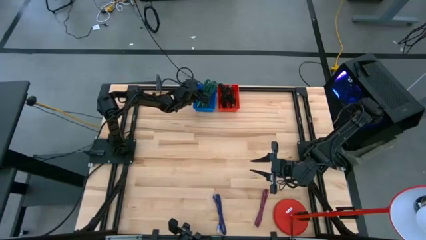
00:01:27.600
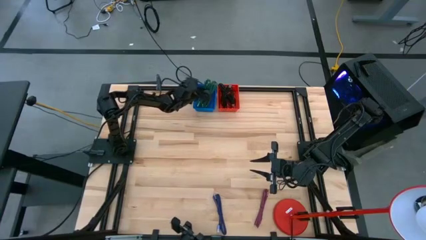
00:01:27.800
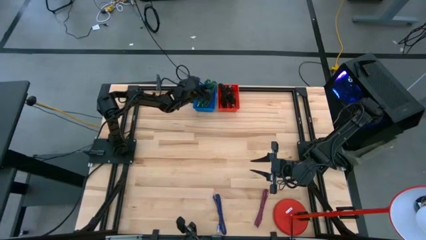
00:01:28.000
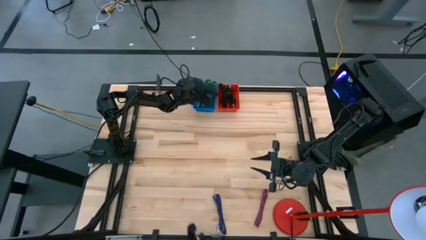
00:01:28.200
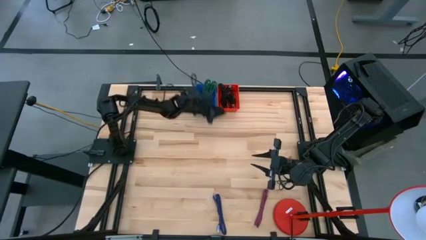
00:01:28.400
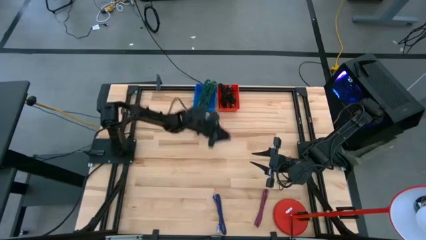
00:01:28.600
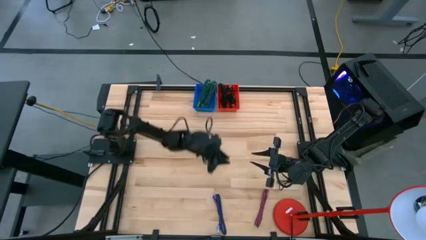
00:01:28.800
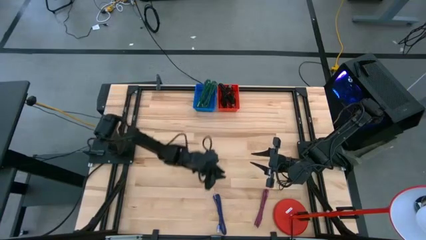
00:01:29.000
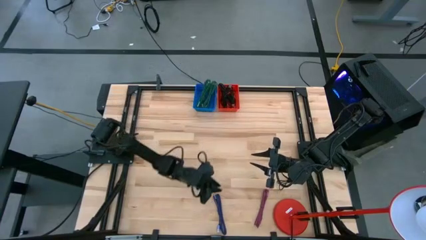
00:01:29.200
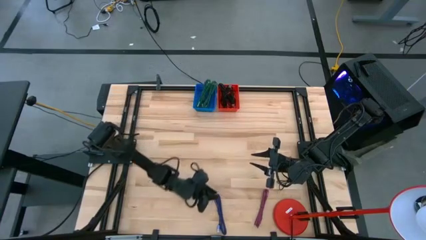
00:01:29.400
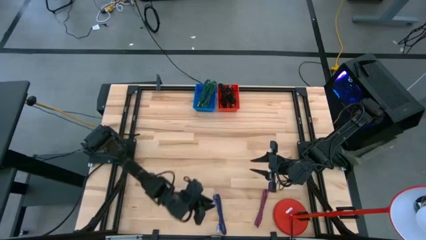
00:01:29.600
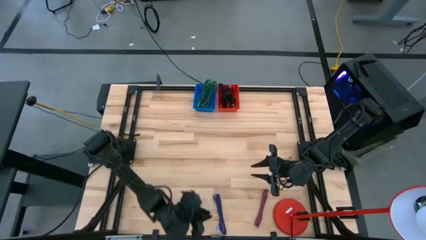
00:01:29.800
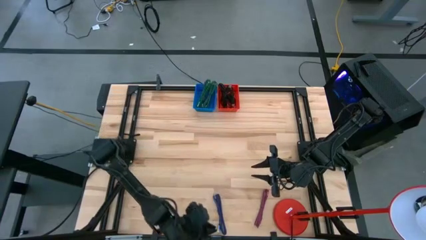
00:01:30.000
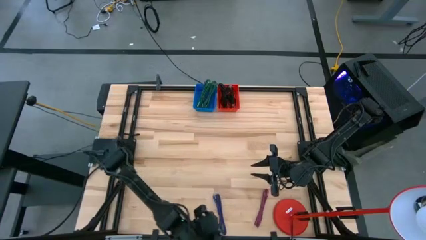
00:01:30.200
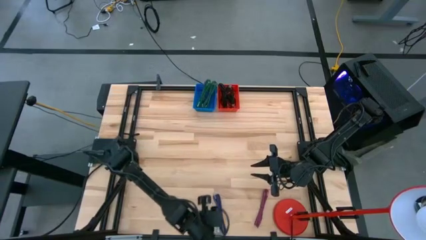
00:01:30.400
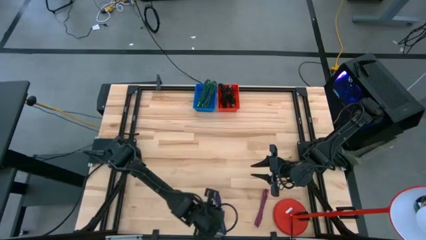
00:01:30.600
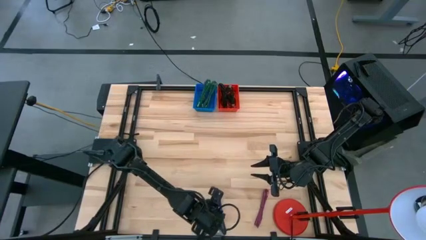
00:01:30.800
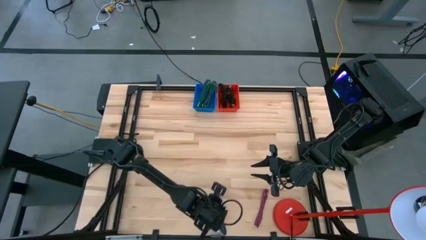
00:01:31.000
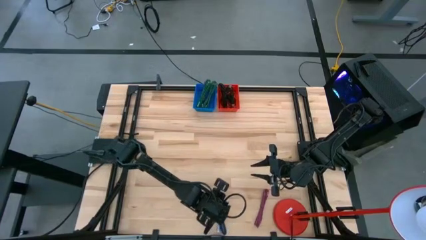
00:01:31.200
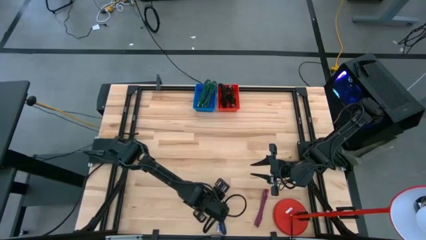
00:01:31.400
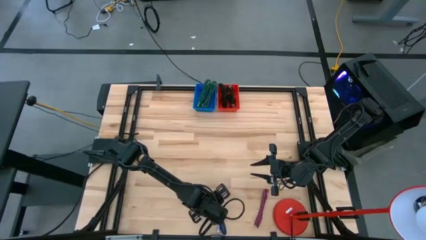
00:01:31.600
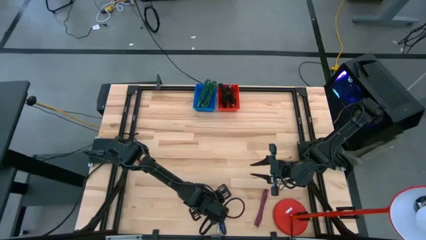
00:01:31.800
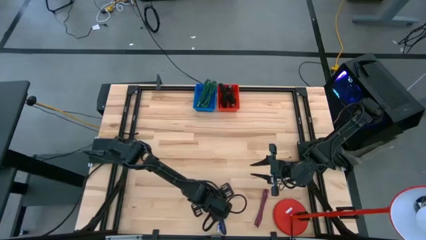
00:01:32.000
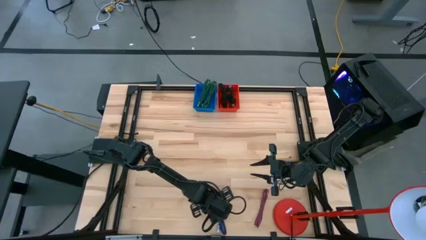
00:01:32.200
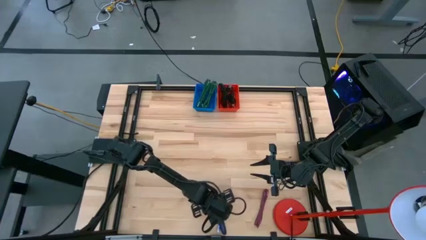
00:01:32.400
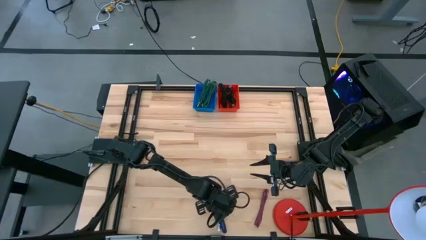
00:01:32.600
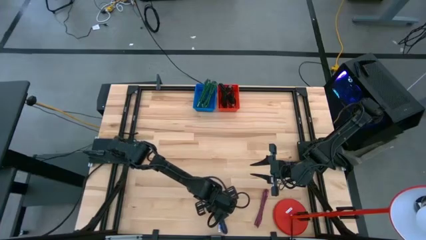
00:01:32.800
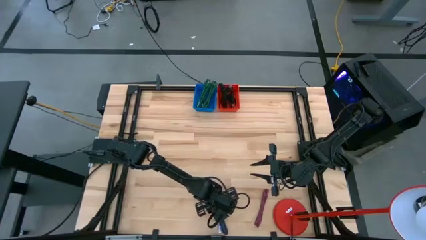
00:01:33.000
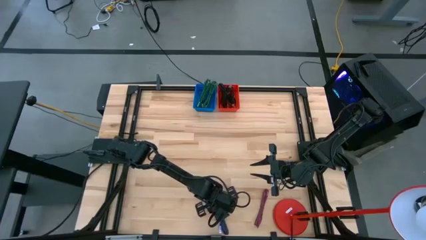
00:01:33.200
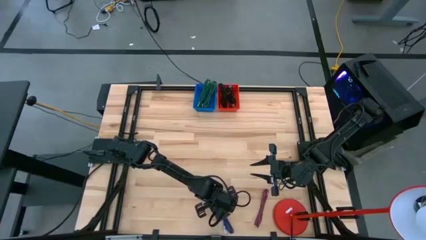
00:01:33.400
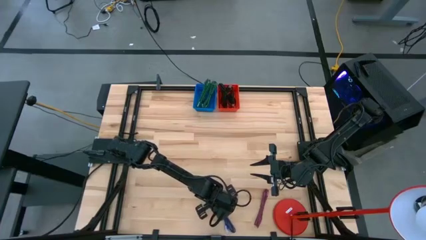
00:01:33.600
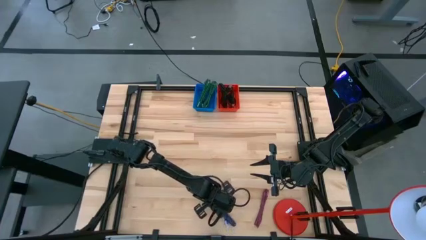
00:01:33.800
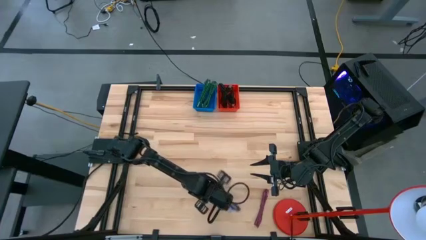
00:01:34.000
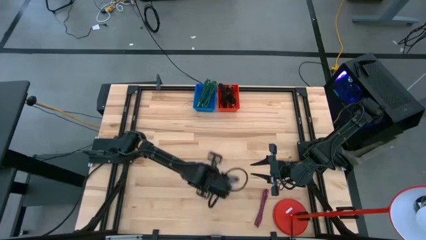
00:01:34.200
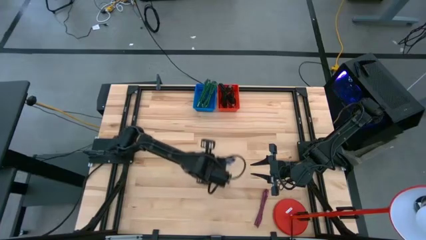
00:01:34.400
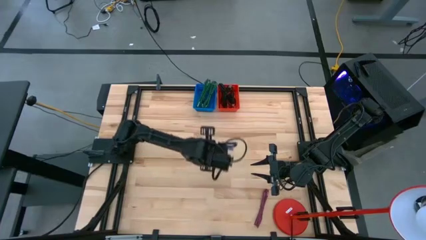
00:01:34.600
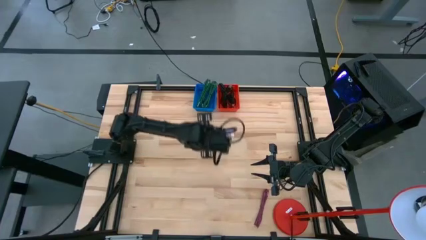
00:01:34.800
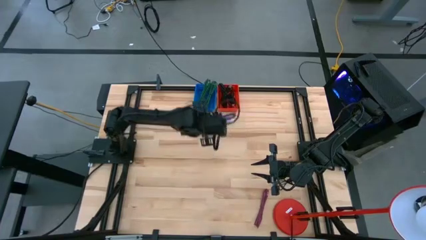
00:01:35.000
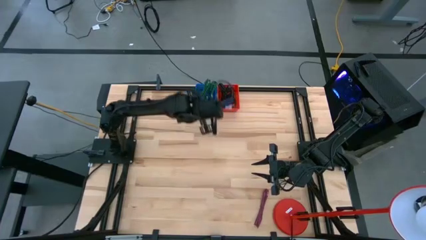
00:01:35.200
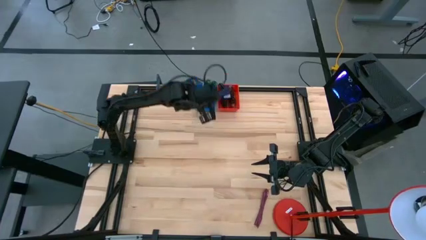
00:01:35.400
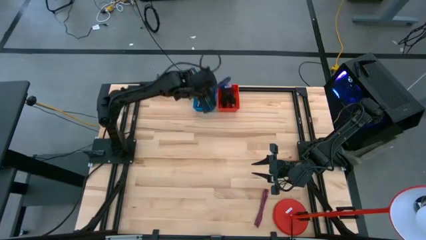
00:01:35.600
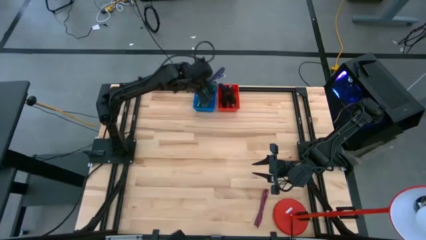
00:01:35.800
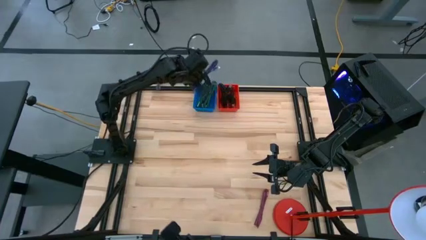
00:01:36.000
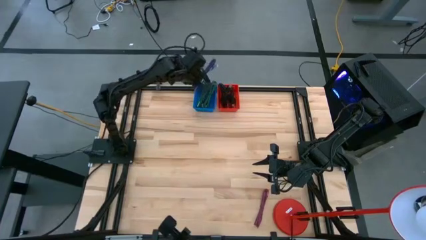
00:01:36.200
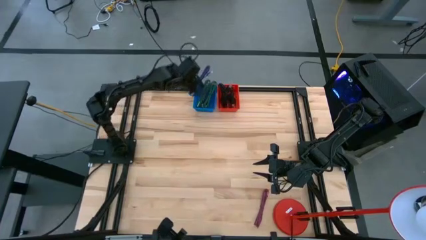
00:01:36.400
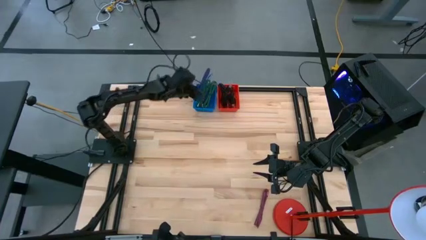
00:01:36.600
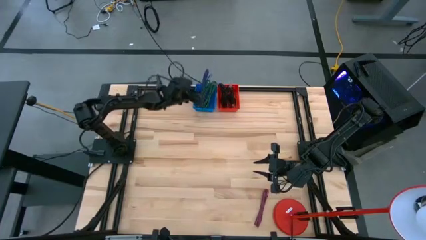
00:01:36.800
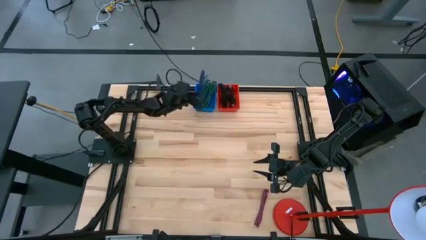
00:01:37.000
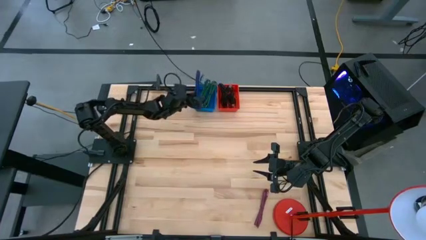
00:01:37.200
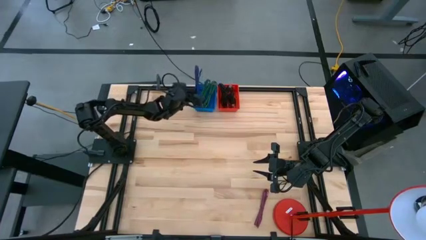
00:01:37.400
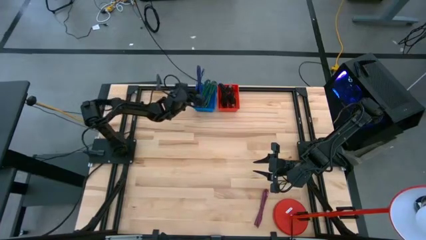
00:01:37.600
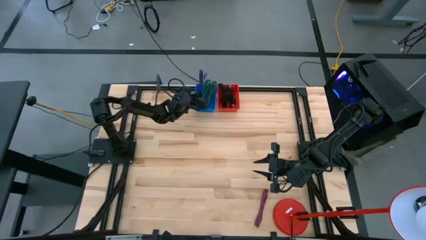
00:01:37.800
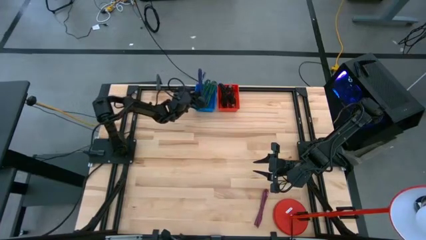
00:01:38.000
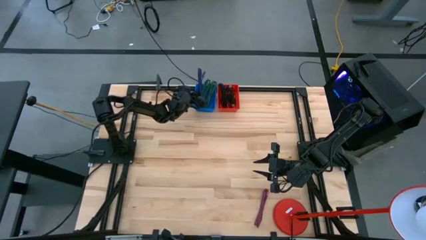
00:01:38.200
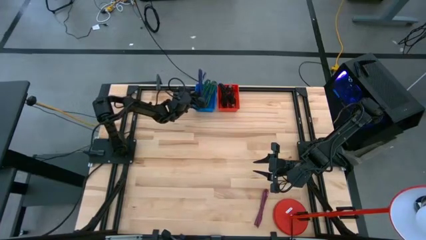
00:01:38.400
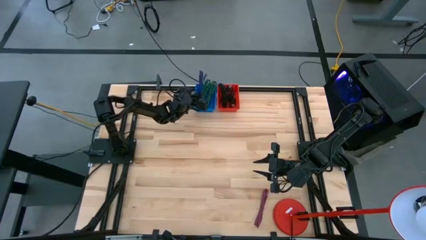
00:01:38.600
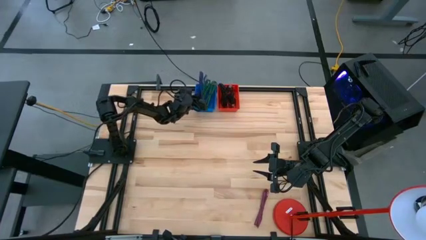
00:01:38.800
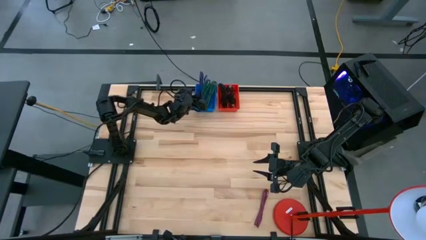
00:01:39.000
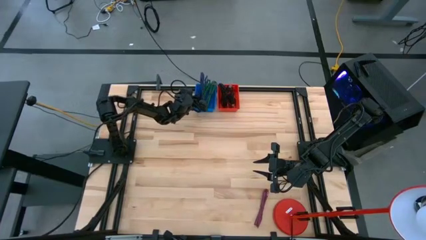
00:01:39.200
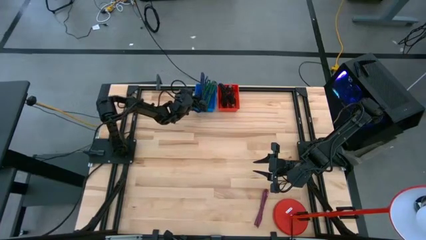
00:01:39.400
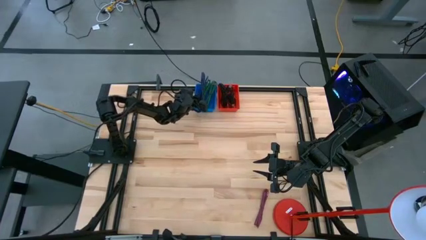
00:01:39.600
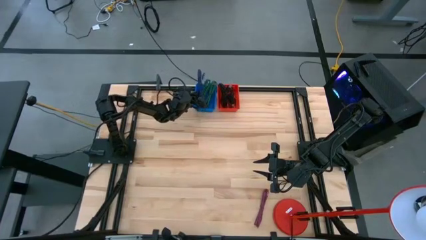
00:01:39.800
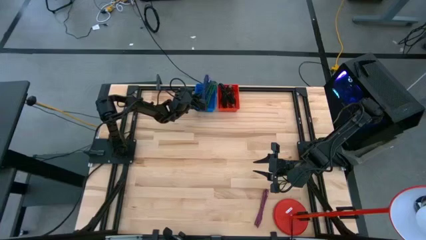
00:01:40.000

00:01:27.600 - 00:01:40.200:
Task: Pick & Place USB Port
Put the purple charger cable into the blue bin

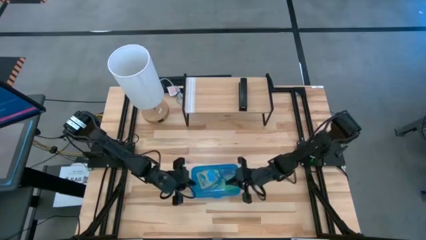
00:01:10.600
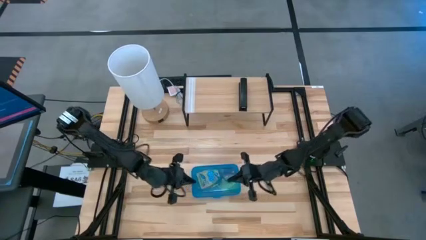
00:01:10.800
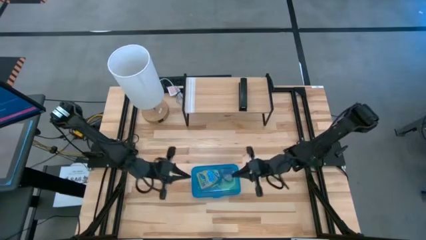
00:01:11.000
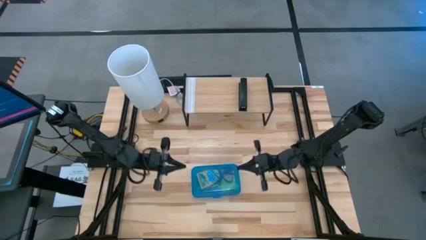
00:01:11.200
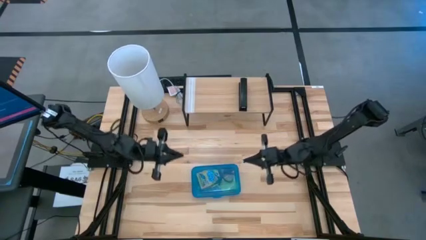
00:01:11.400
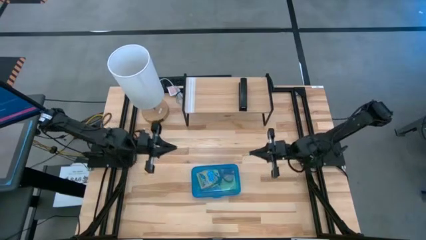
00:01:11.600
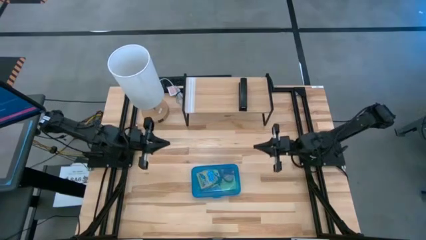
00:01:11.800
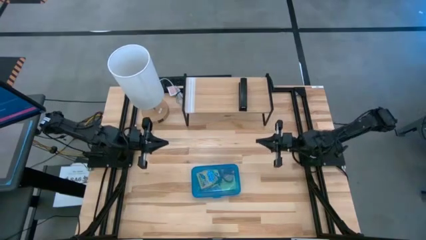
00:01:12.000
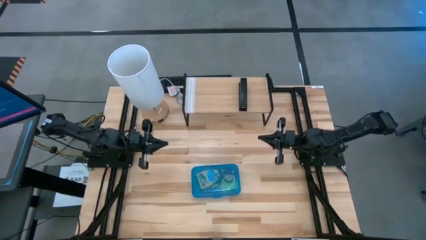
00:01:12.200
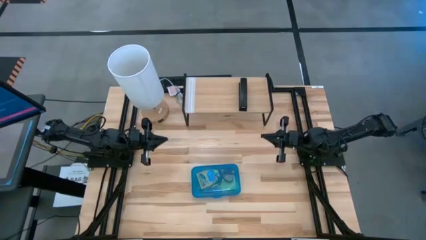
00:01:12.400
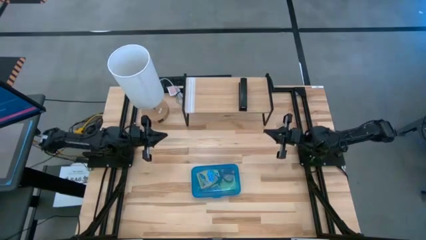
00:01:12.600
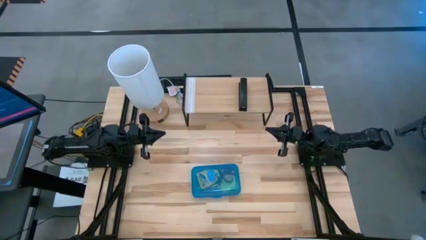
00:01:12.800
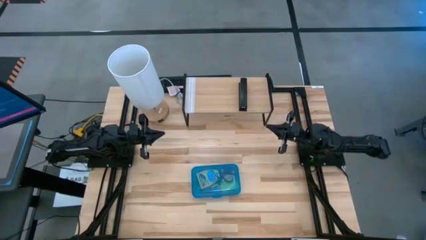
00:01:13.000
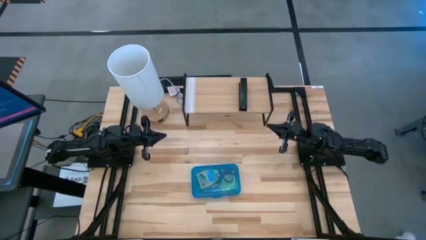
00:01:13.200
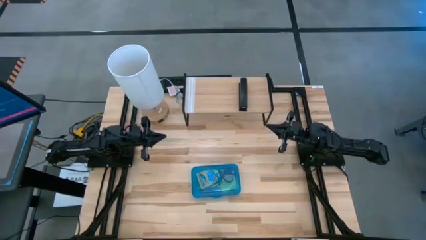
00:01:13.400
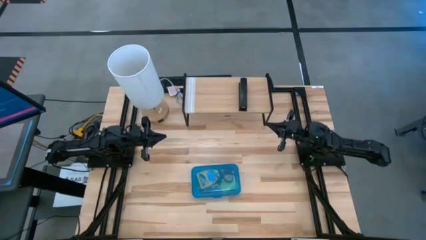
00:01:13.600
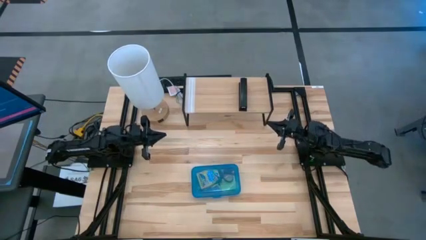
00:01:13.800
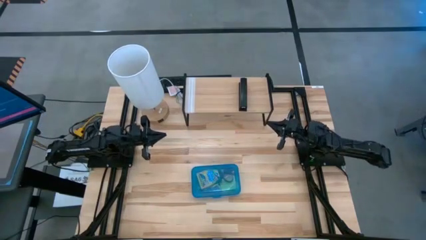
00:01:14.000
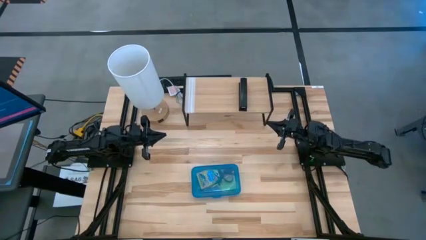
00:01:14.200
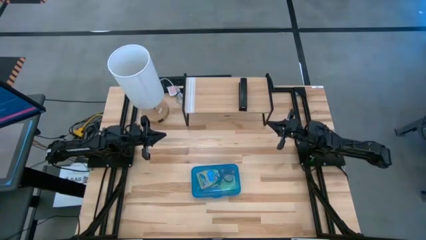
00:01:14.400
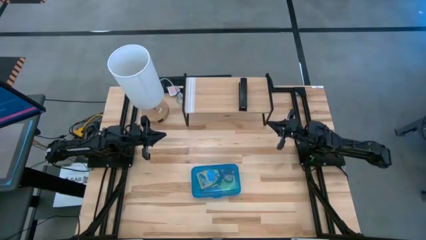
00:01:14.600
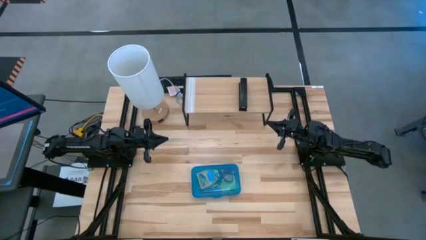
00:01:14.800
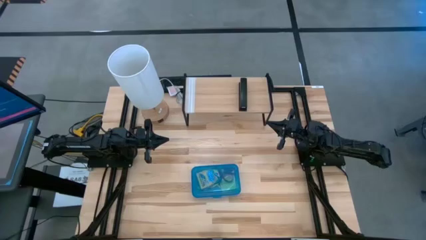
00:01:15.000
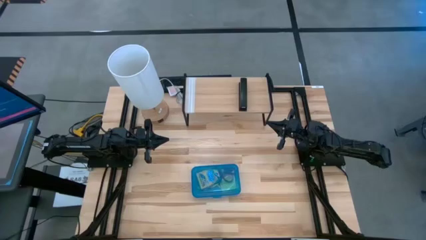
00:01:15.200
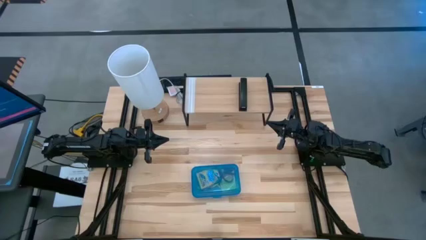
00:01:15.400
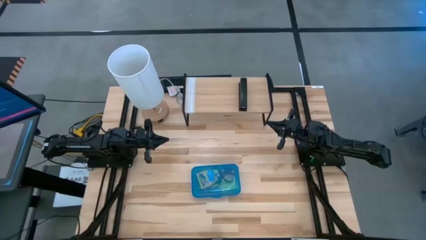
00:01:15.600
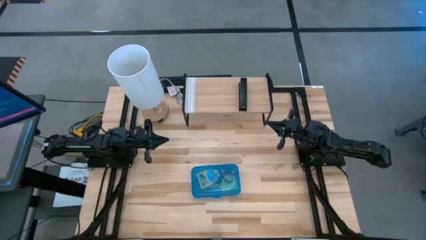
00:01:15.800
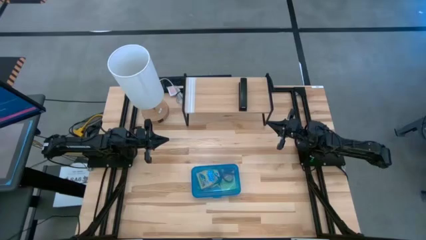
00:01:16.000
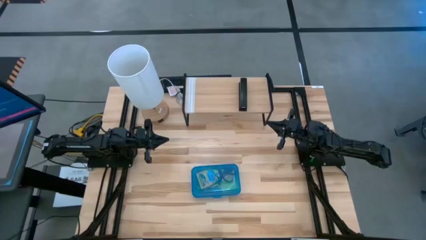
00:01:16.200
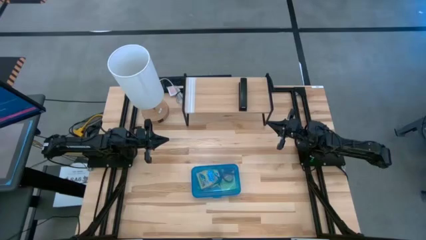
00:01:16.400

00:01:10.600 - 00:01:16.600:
Task: Pack school essentials
Return to Home Position
